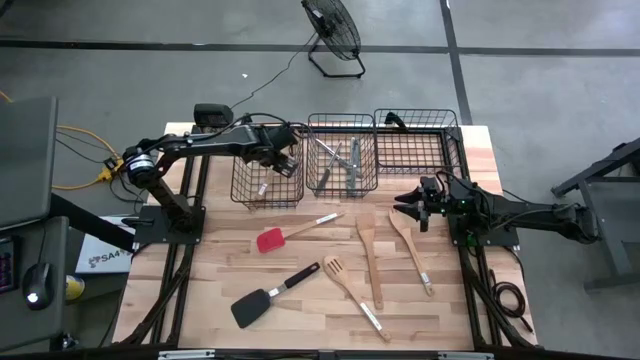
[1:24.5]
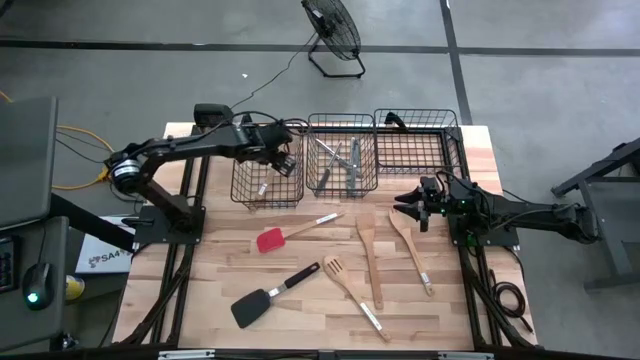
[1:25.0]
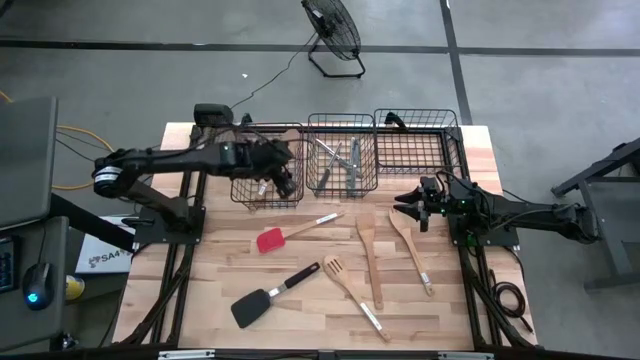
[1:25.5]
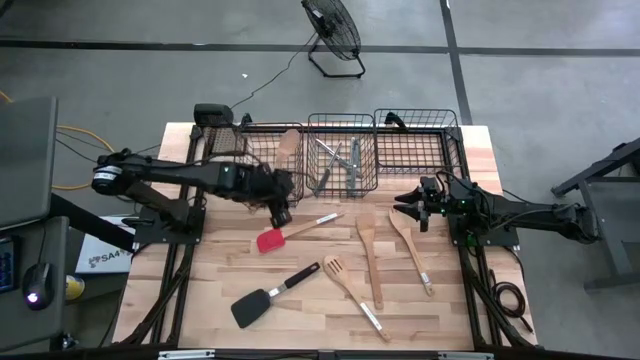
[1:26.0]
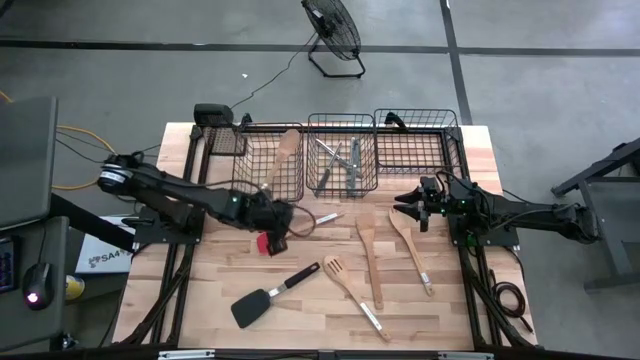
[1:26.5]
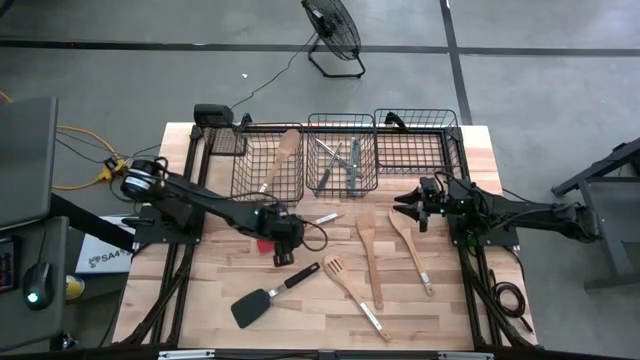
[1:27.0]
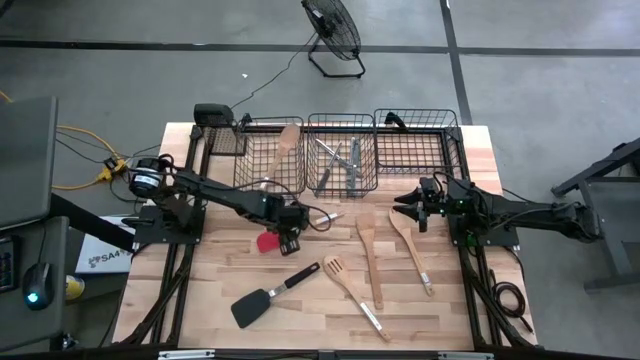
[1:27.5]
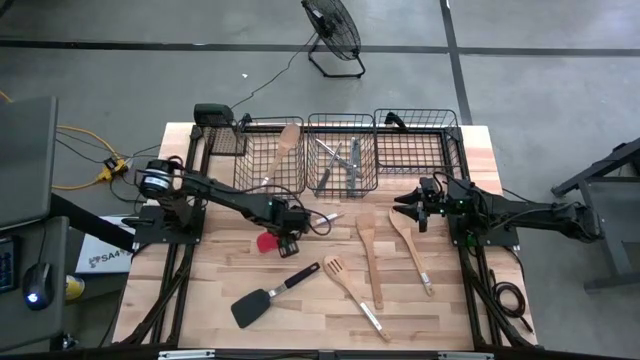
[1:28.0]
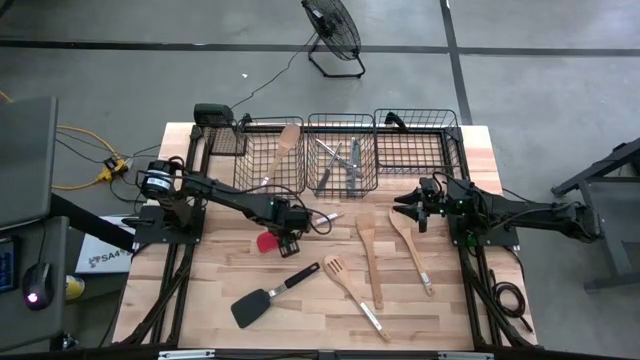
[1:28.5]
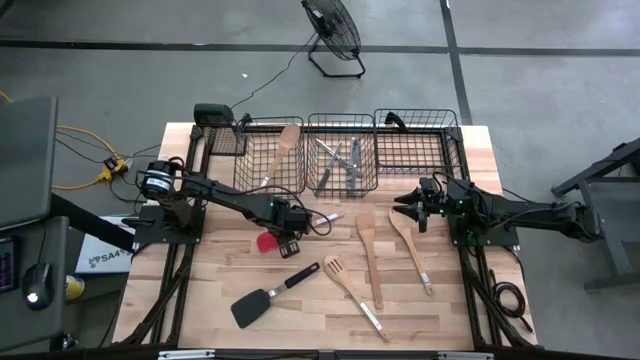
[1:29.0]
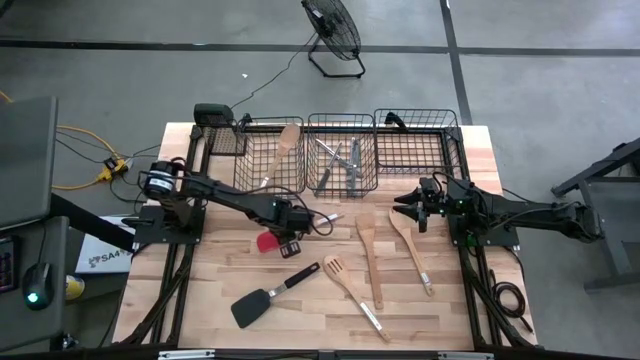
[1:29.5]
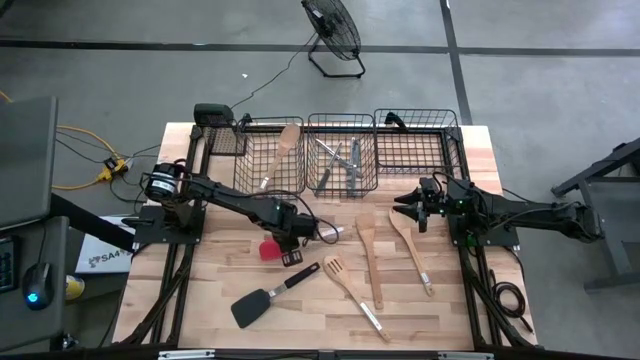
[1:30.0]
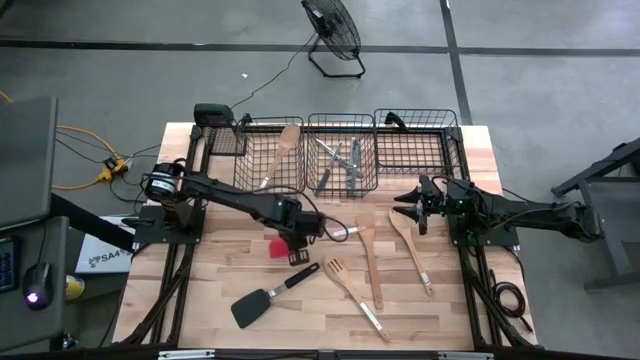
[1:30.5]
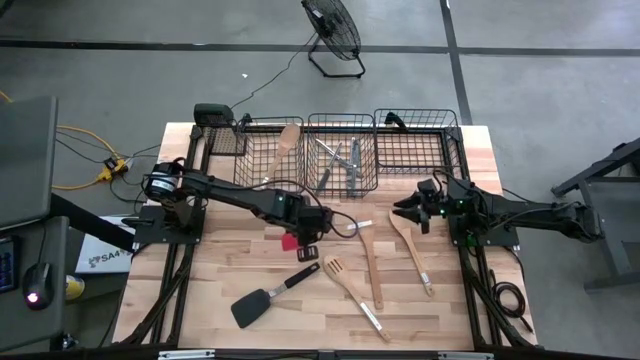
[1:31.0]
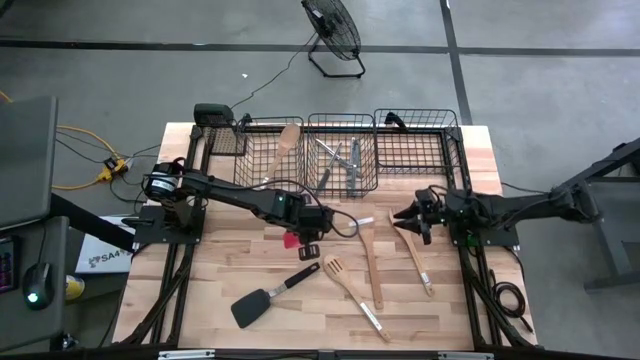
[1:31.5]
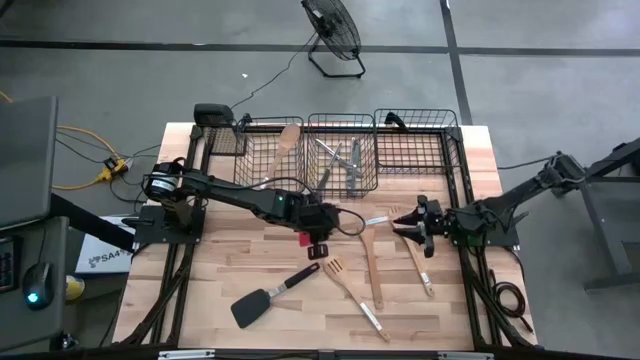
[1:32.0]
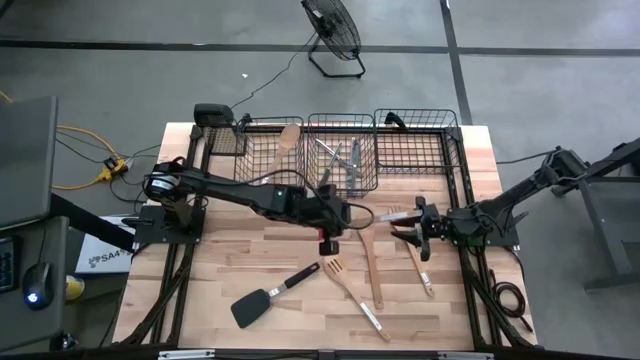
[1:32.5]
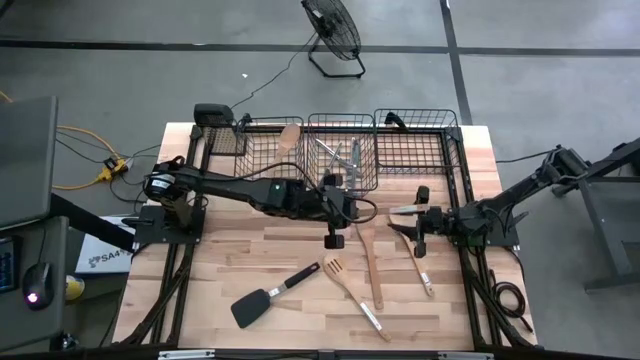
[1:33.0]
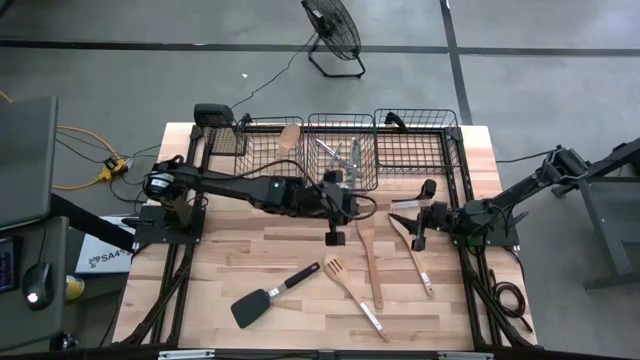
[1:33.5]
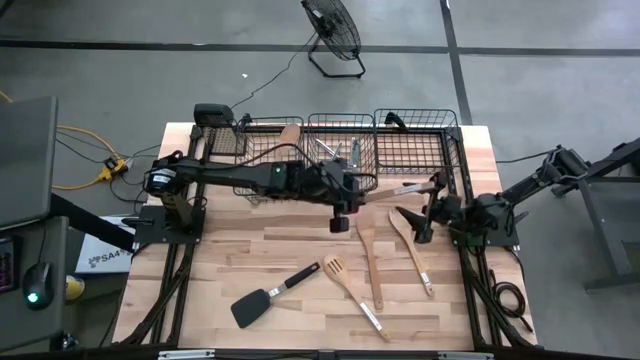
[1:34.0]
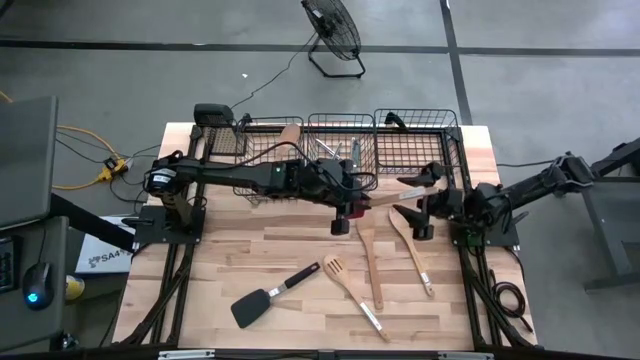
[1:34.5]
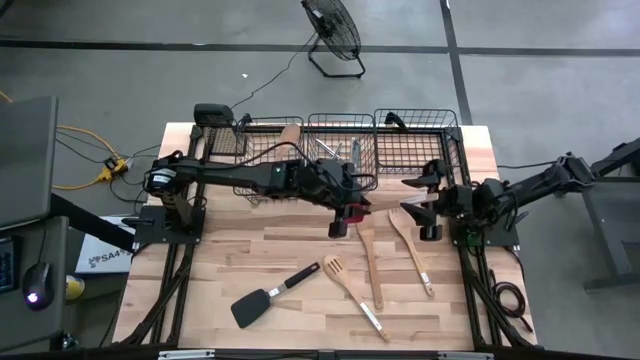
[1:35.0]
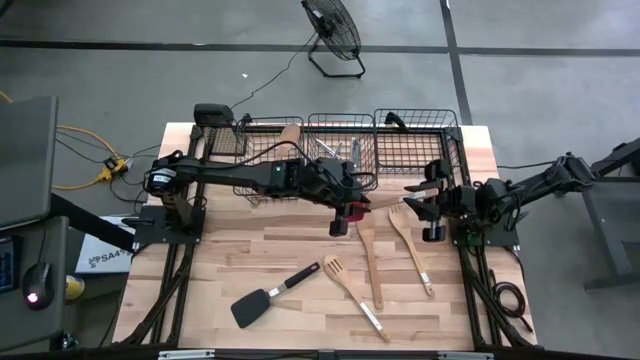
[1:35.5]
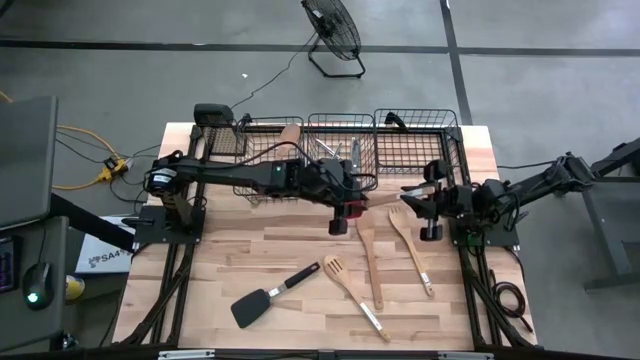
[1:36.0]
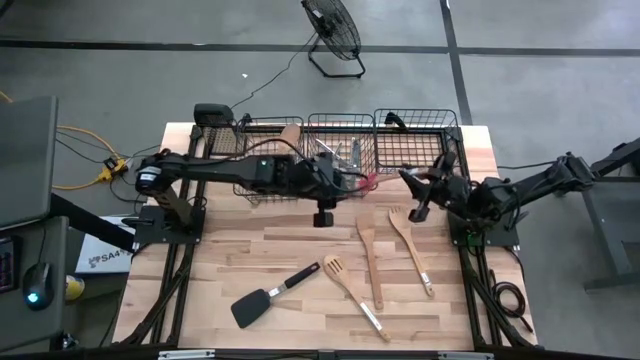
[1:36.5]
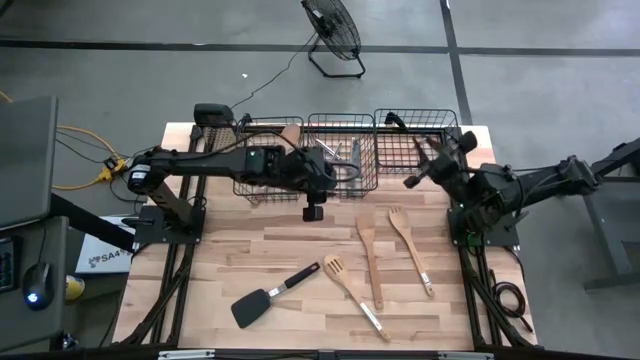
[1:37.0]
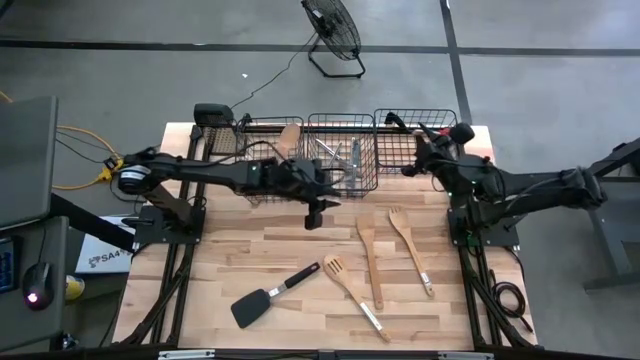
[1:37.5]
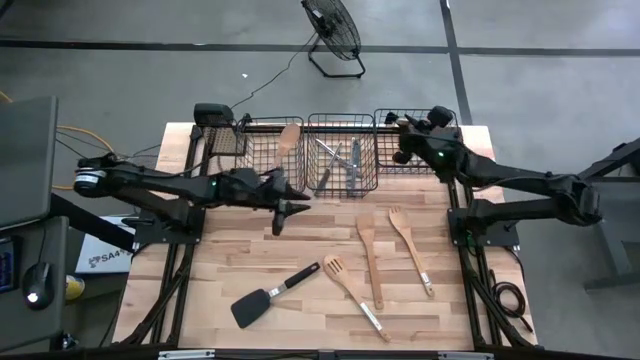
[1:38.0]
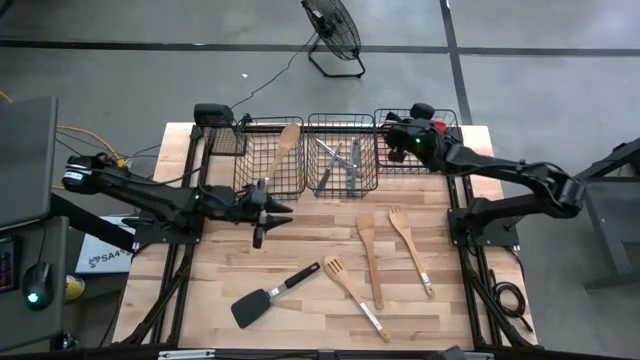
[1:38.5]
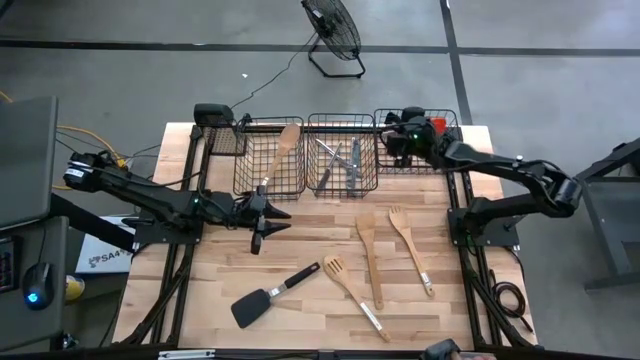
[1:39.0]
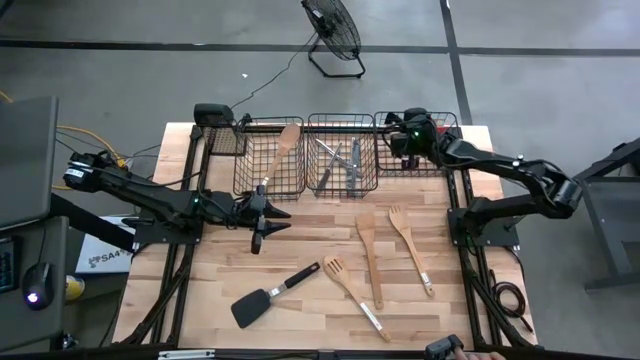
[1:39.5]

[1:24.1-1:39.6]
Task: Pick & Place Kitchen Items
Put the red spatula into the right wire basket
